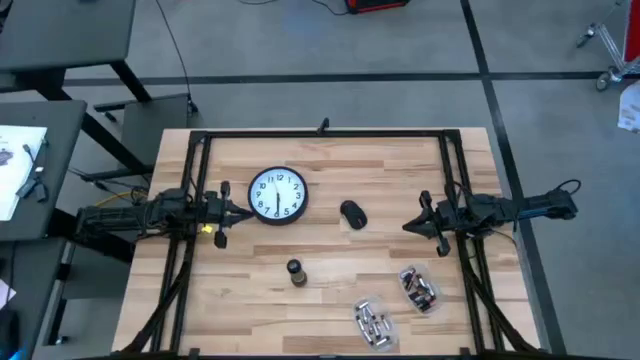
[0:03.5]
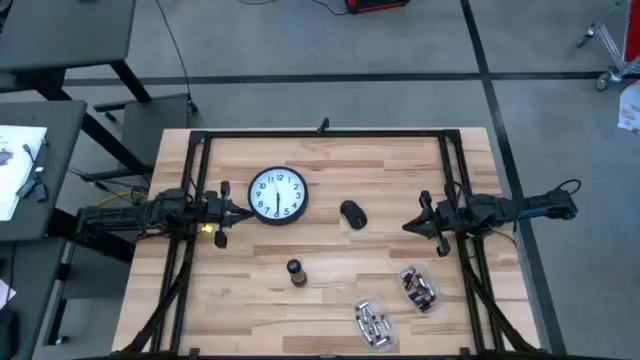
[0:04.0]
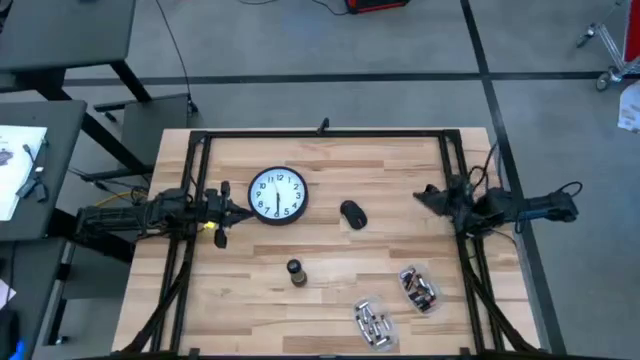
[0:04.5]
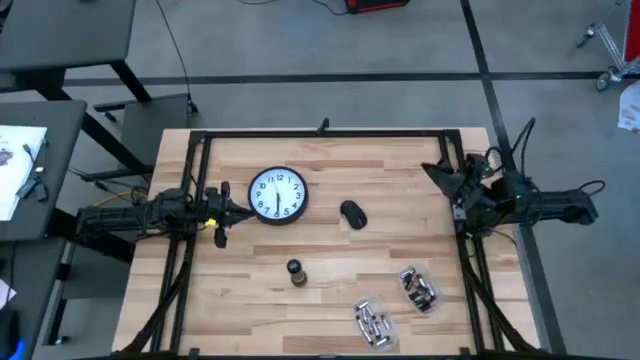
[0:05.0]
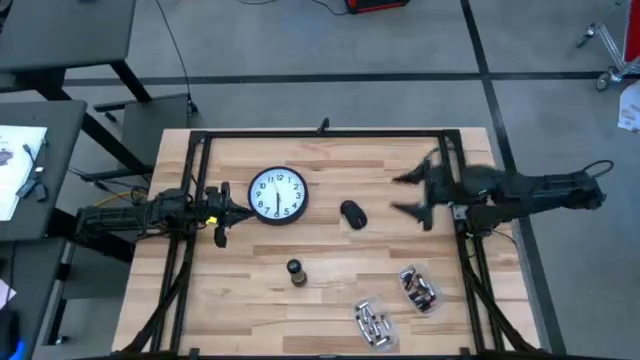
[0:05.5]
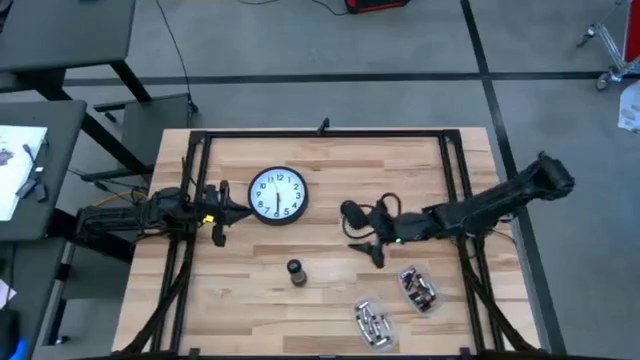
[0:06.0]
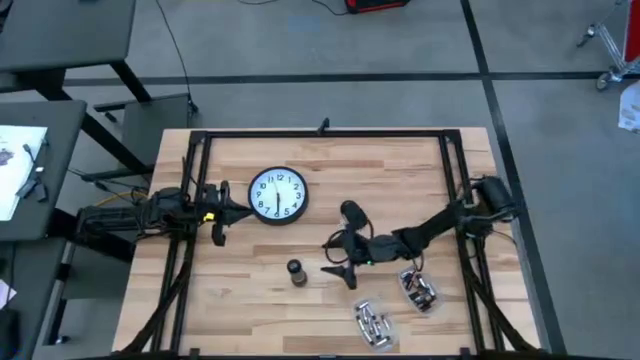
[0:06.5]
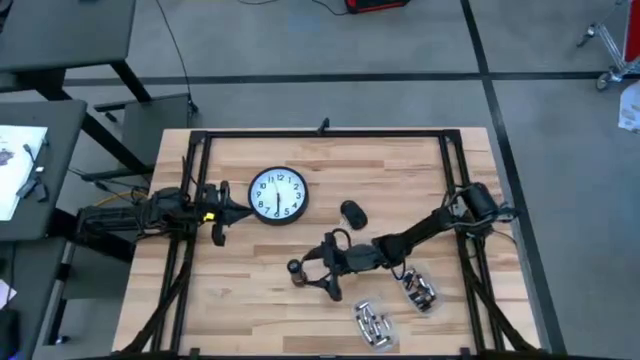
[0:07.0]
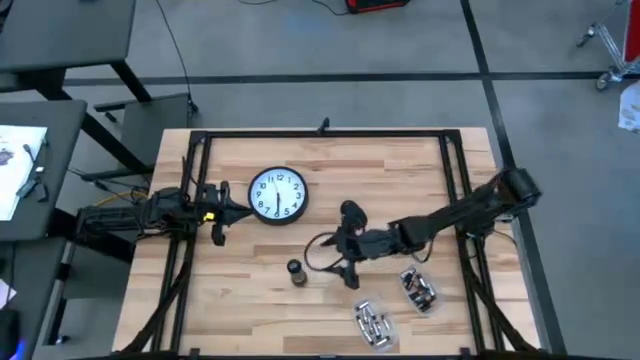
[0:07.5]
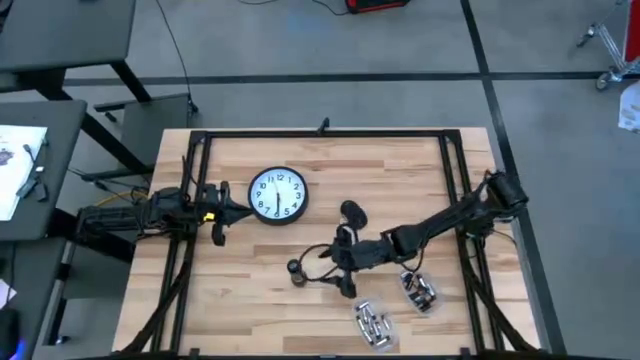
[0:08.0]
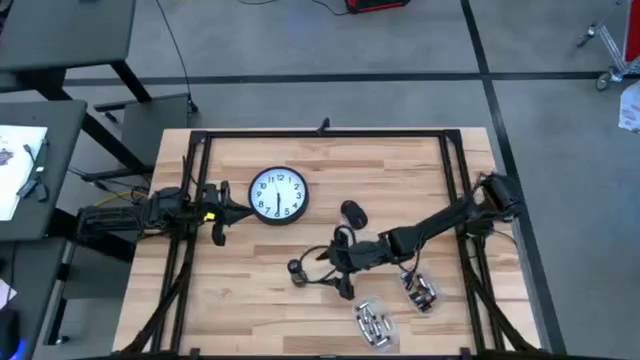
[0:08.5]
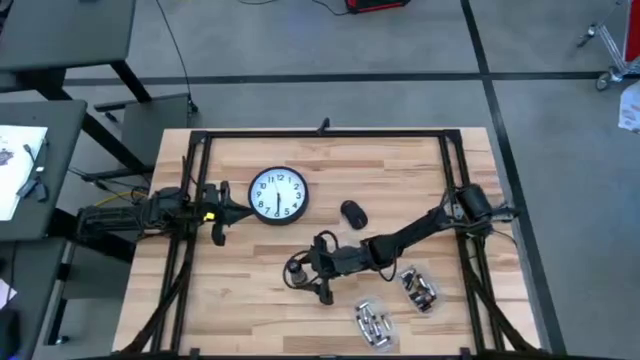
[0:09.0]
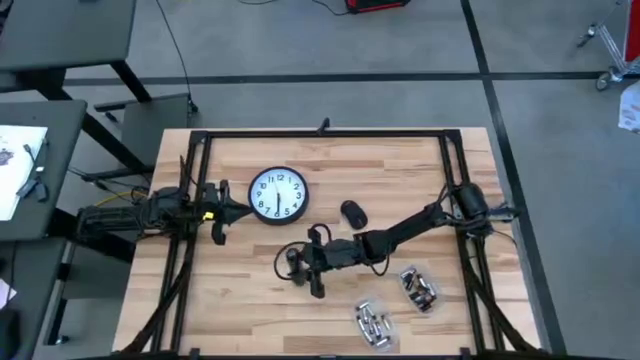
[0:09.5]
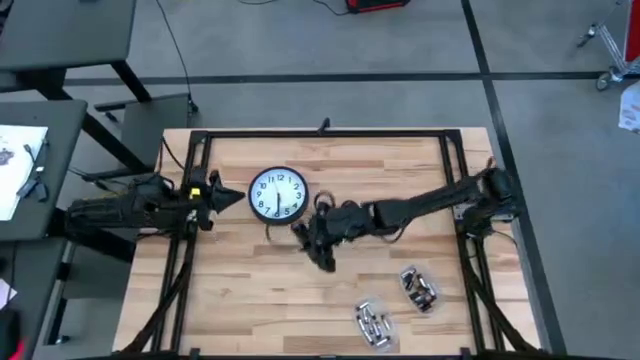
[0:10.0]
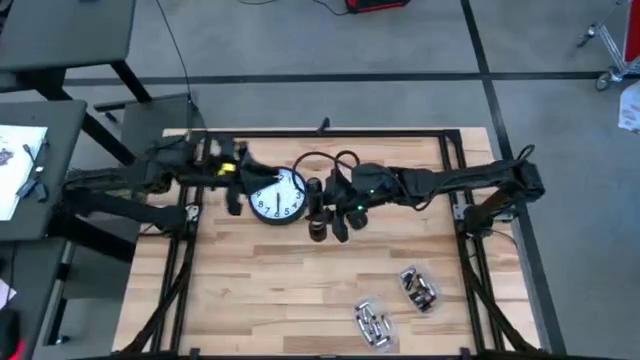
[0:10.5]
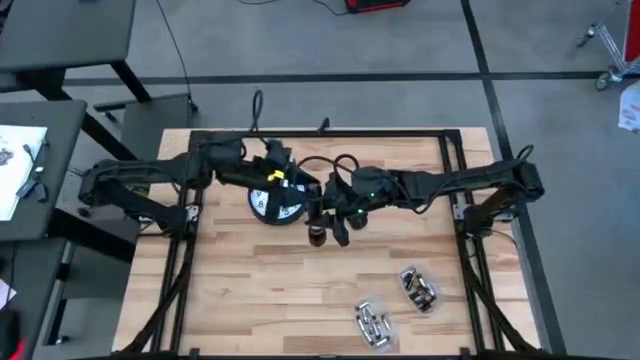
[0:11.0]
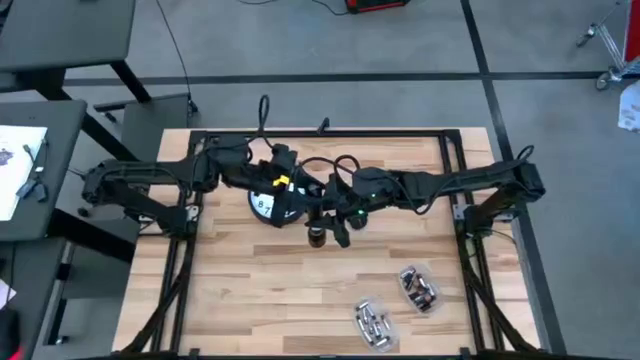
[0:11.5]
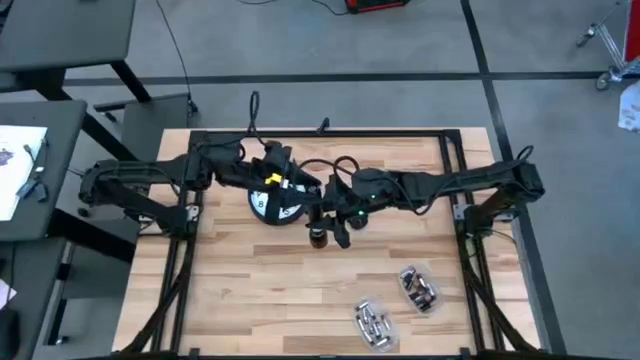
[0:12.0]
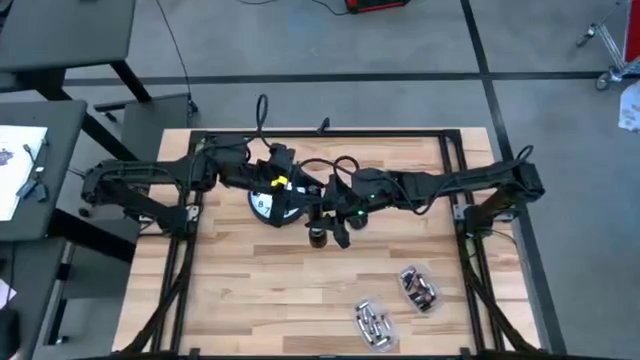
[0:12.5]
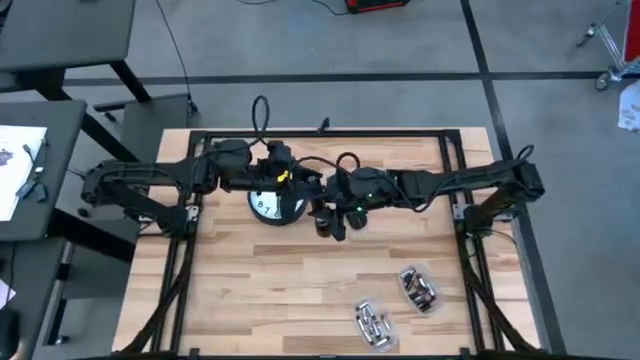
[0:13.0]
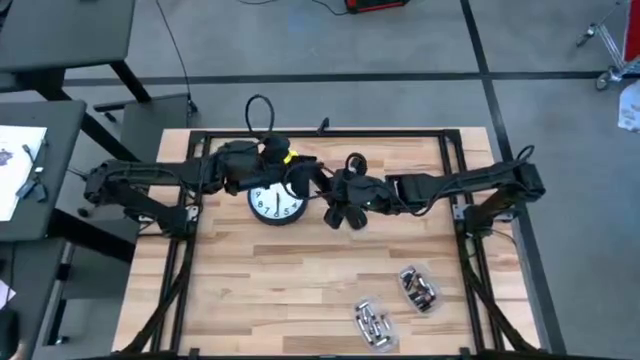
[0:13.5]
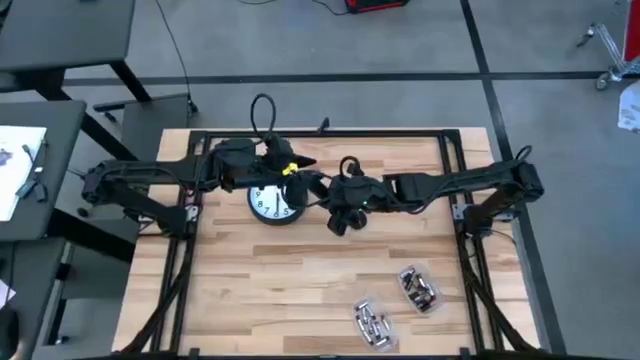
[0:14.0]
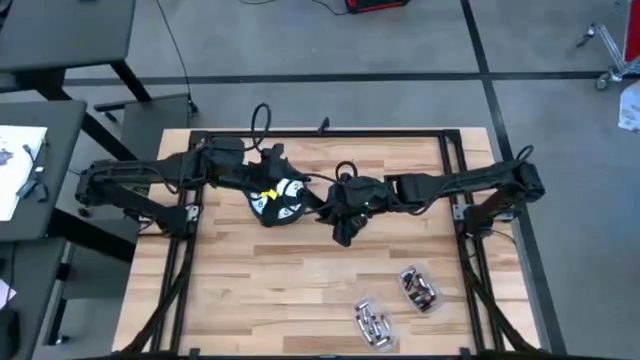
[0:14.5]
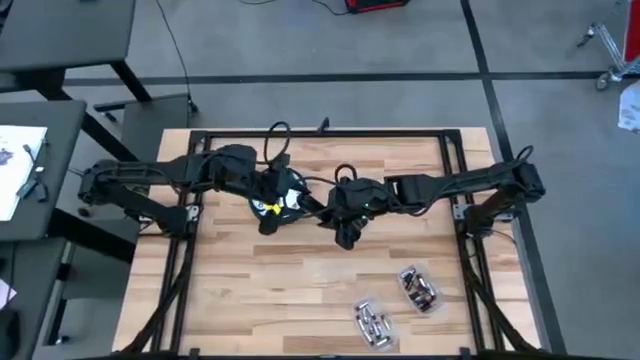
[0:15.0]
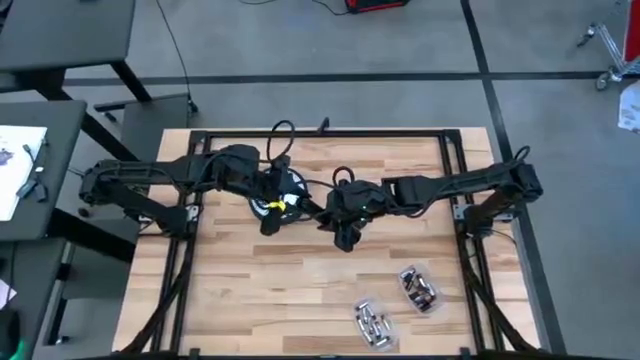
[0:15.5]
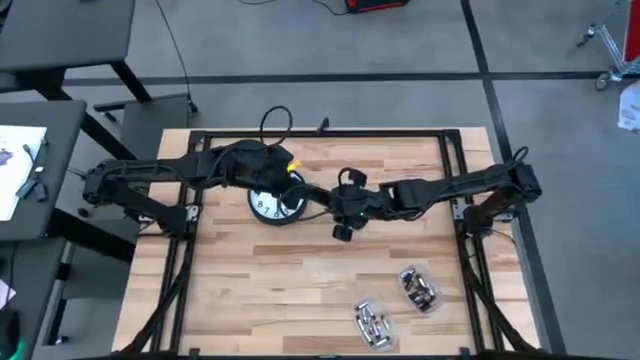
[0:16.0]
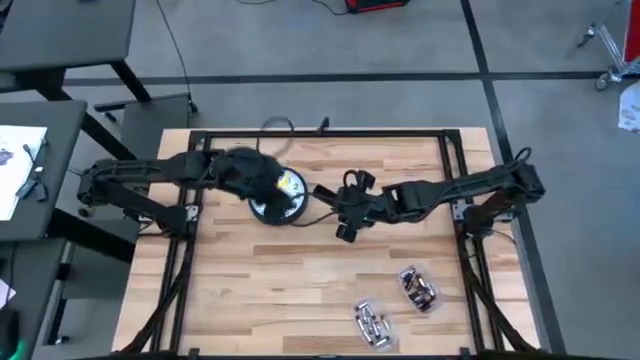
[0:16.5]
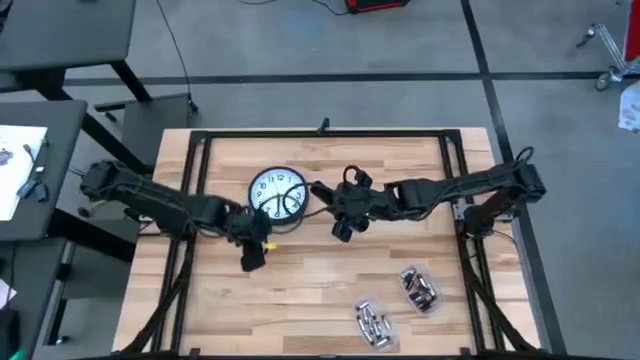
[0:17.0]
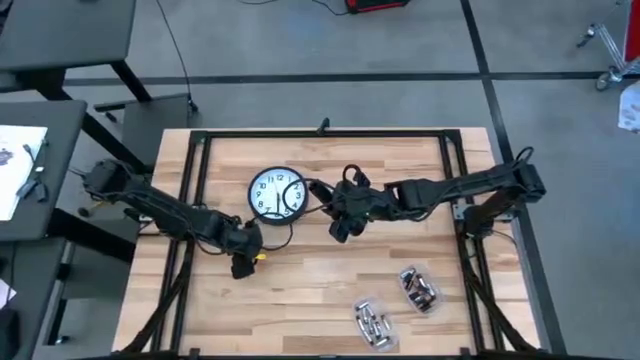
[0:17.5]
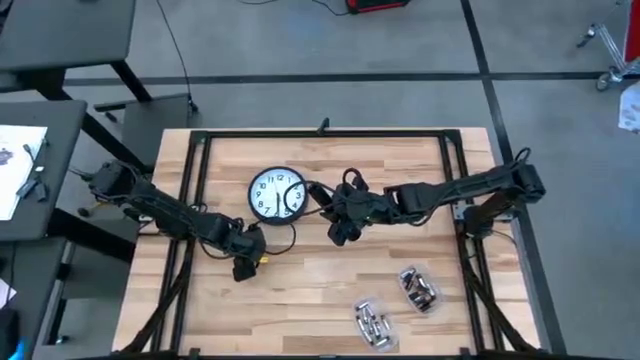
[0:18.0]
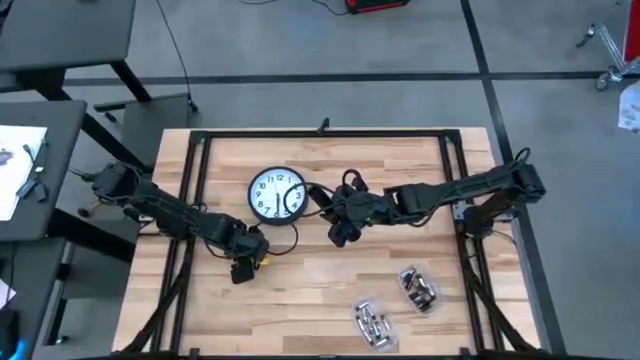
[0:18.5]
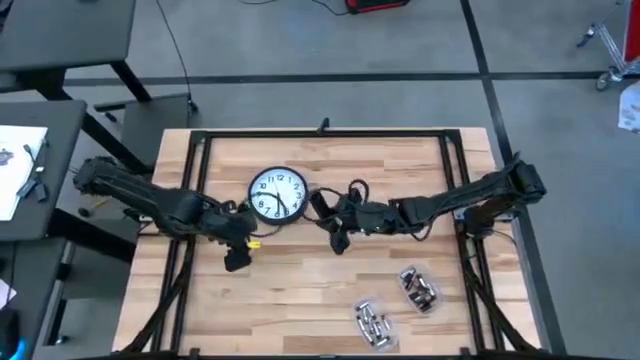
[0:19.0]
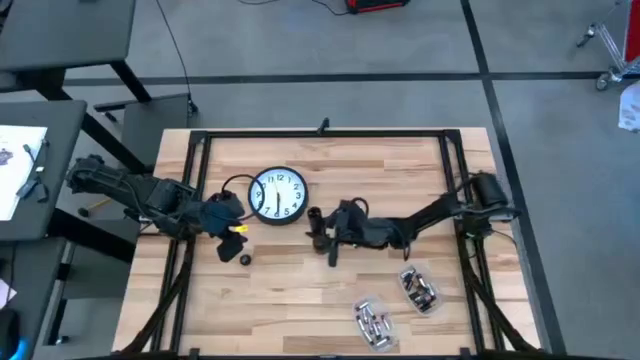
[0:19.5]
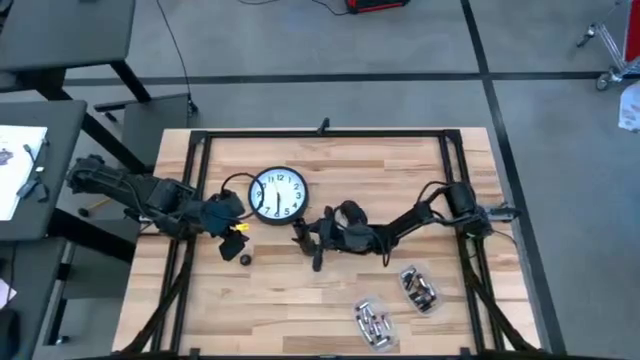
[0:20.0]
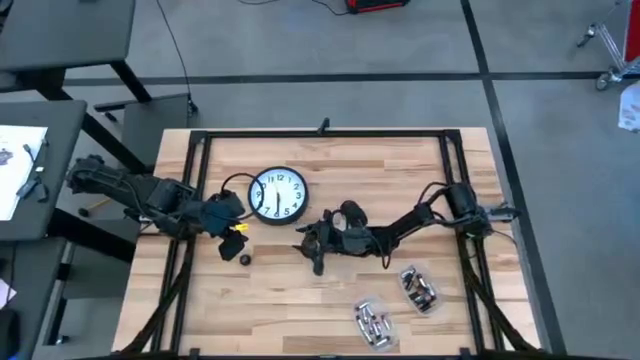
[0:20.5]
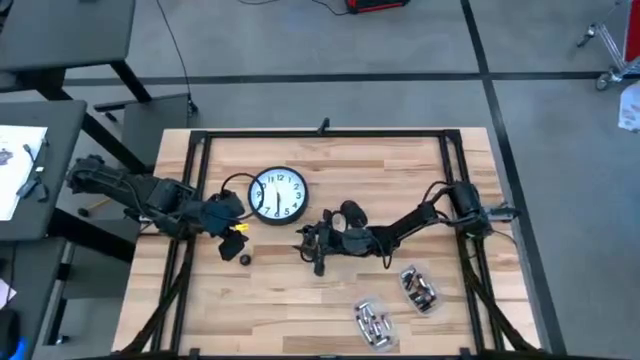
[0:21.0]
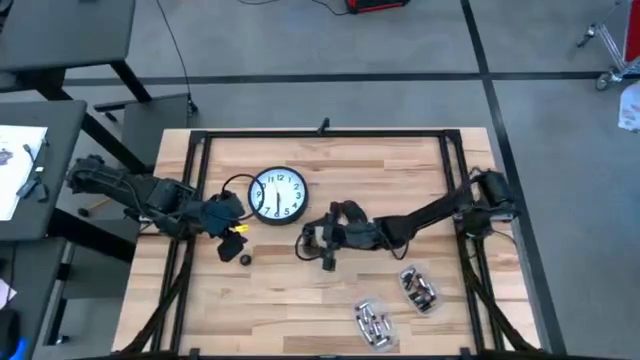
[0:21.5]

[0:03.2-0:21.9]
Task: Insert battery
Open the black flashlight battery compartment

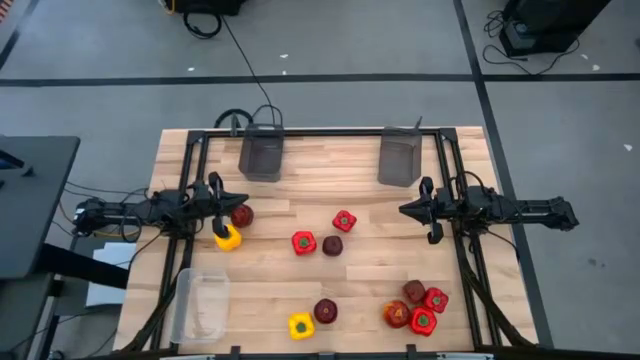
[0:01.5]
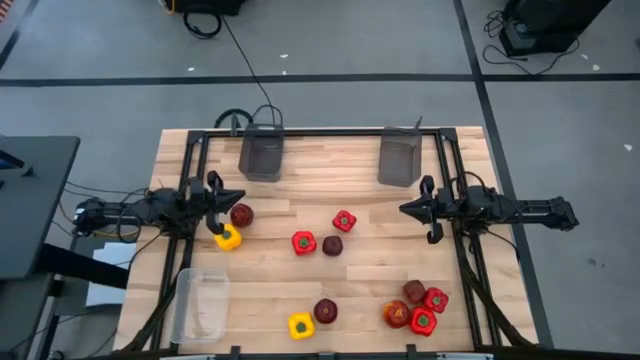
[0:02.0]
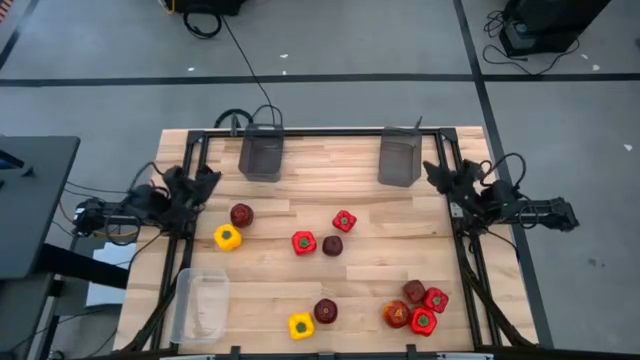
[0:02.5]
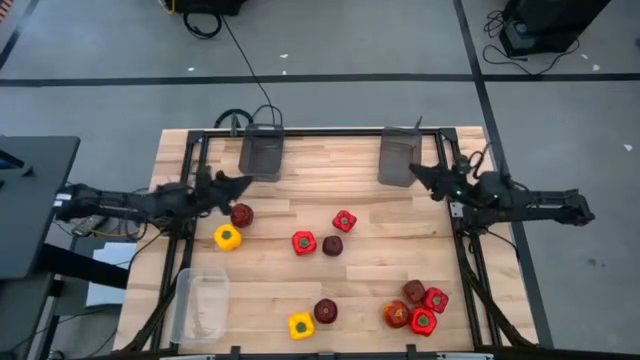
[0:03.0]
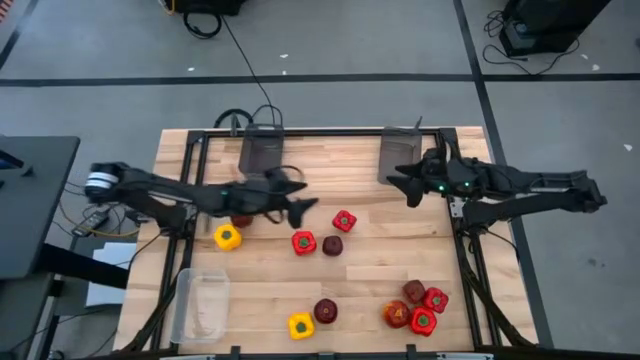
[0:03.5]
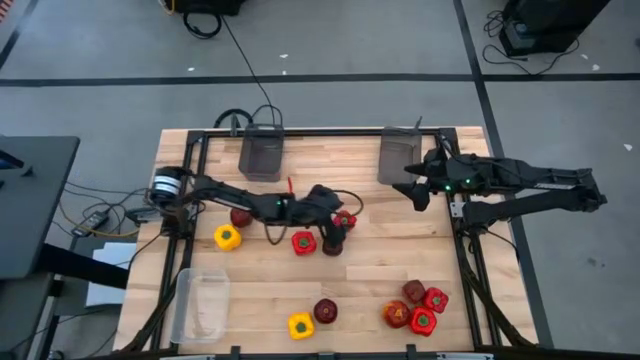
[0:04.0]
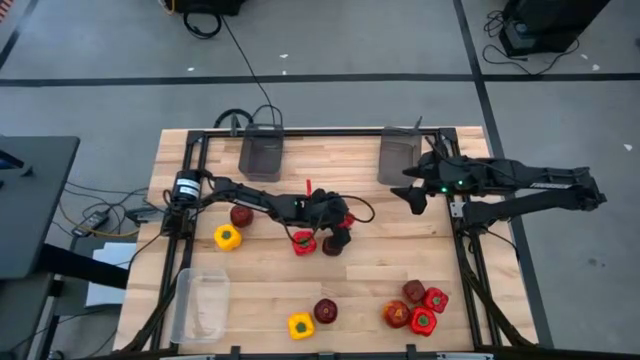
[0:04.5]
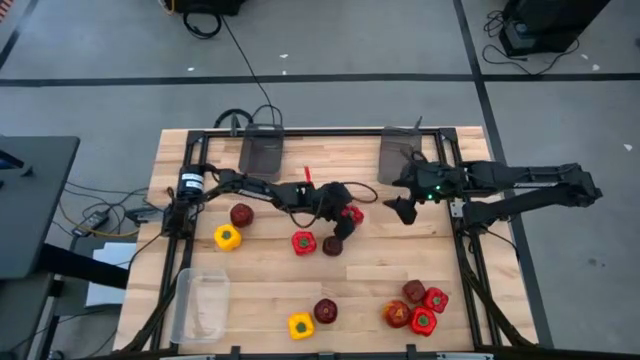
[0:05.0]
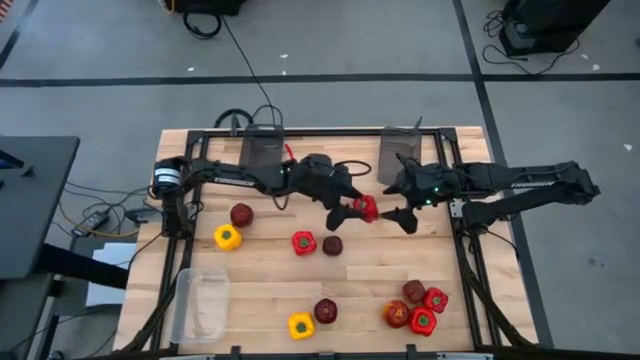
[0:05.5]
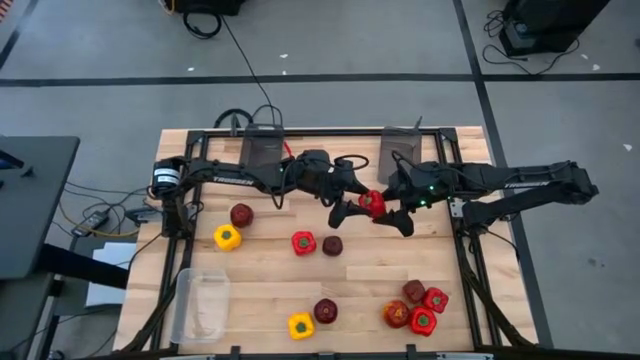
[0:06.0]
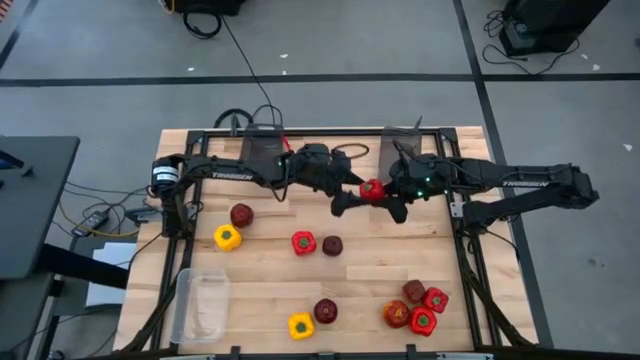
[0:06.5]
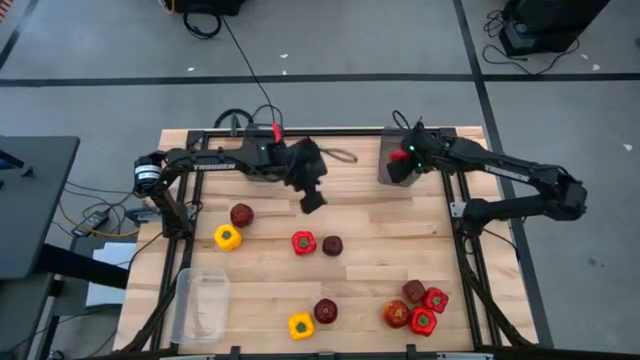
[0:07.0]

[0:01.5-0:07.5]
Task: Sort produce into baskets
Put the top center red bell pepper into the top right black transparent bin
